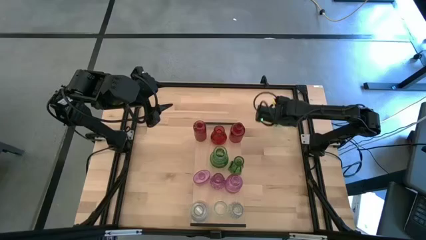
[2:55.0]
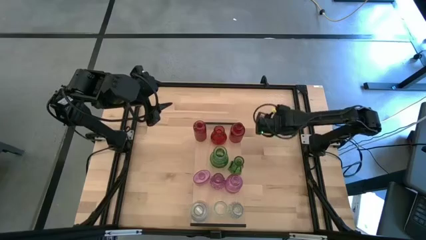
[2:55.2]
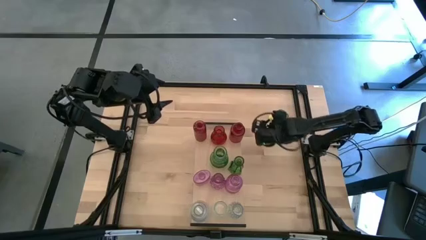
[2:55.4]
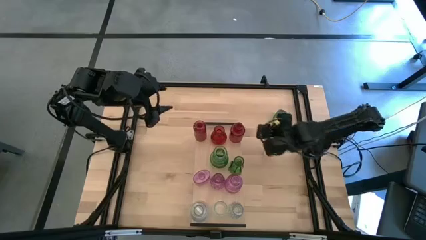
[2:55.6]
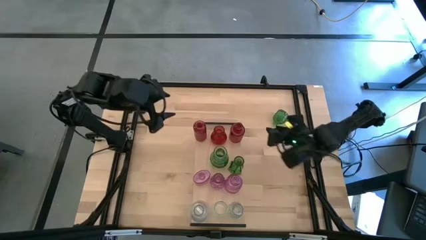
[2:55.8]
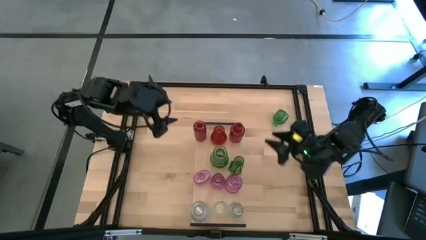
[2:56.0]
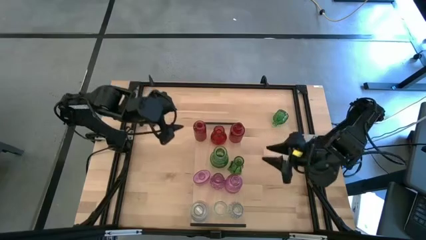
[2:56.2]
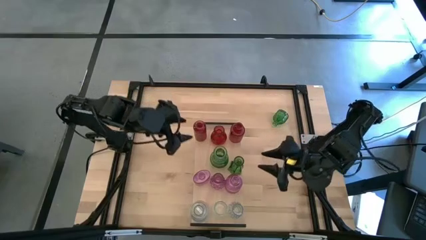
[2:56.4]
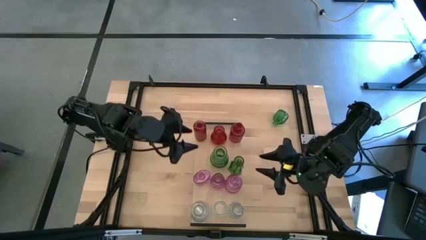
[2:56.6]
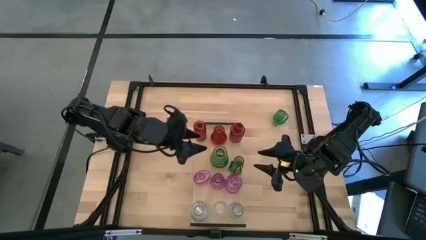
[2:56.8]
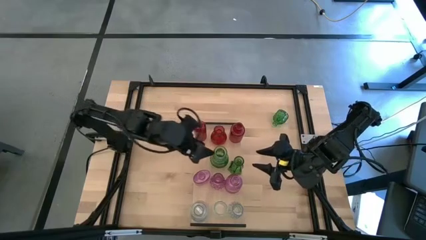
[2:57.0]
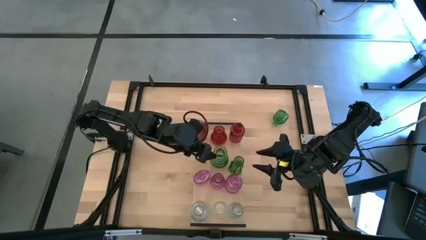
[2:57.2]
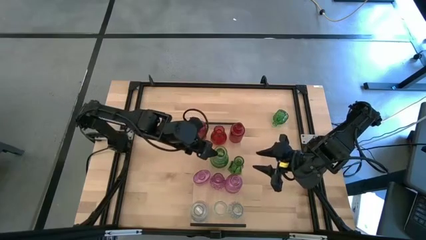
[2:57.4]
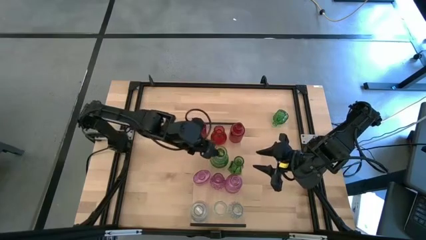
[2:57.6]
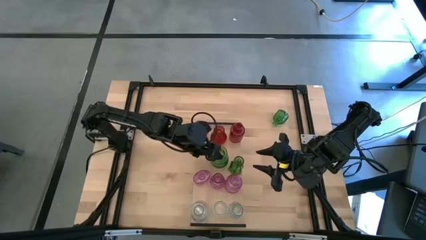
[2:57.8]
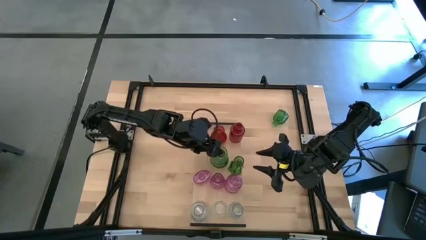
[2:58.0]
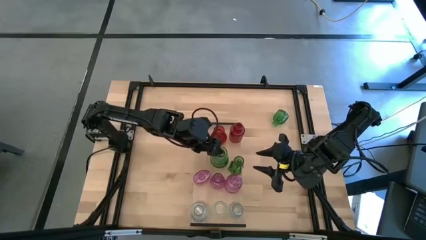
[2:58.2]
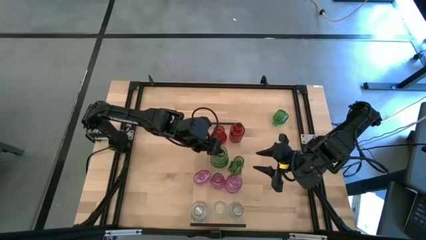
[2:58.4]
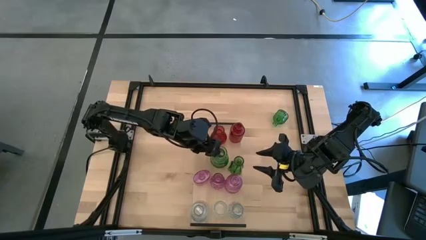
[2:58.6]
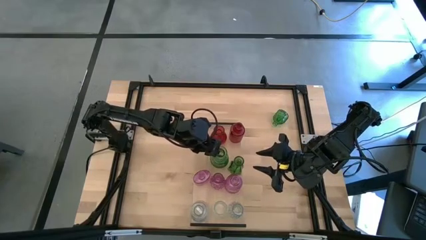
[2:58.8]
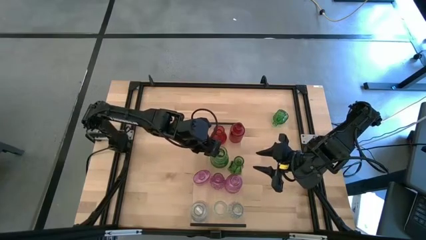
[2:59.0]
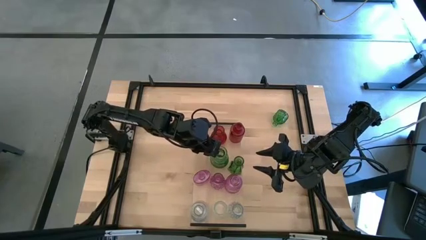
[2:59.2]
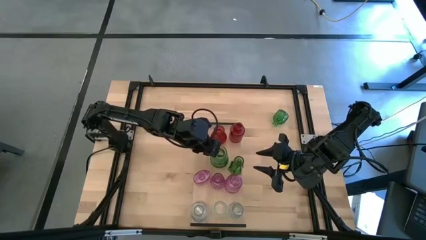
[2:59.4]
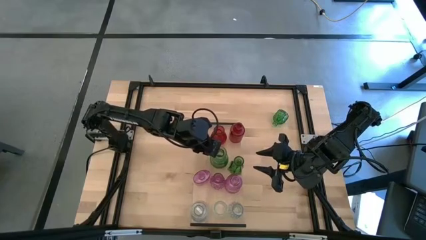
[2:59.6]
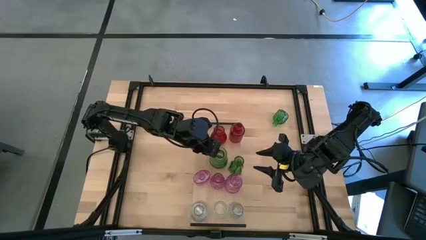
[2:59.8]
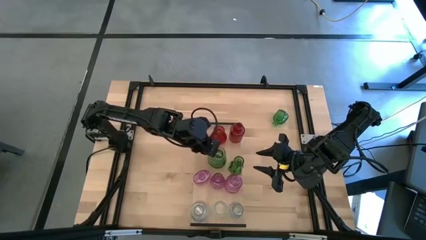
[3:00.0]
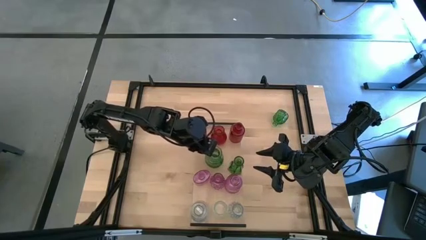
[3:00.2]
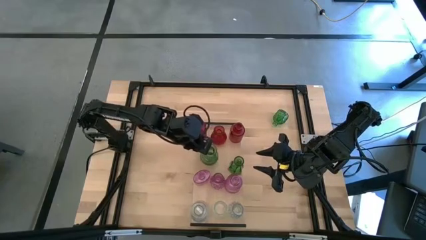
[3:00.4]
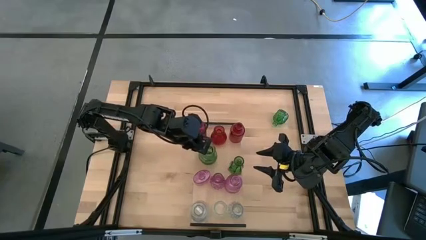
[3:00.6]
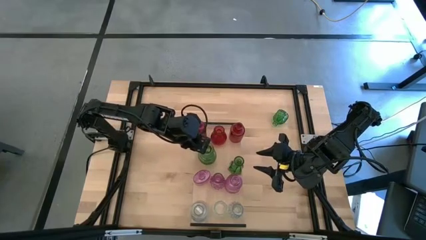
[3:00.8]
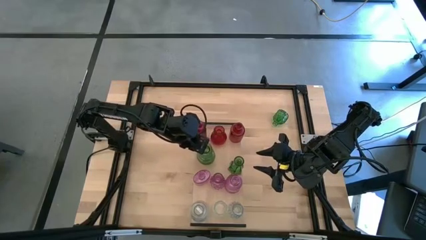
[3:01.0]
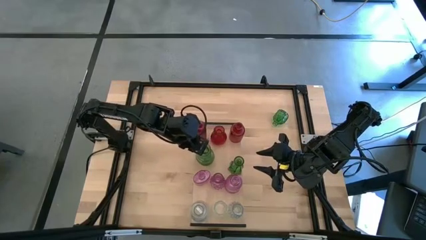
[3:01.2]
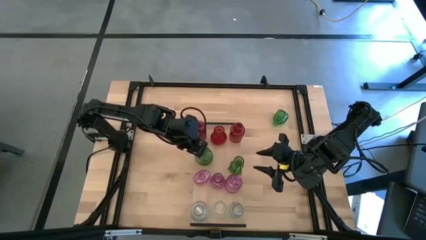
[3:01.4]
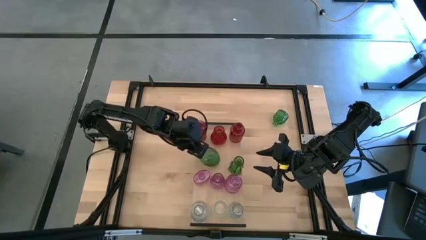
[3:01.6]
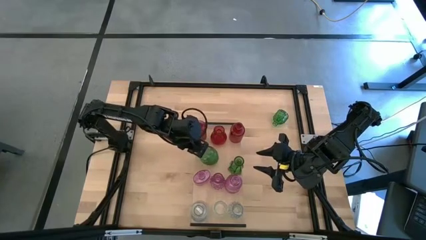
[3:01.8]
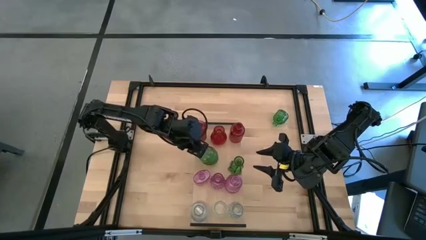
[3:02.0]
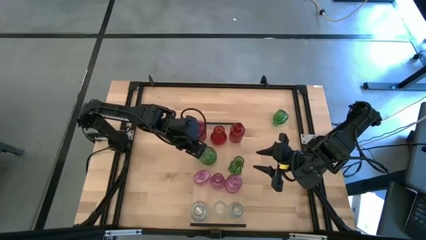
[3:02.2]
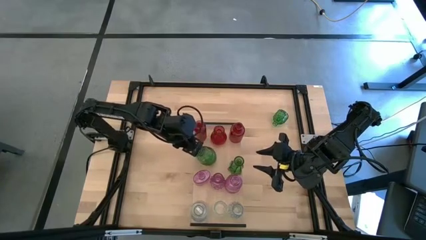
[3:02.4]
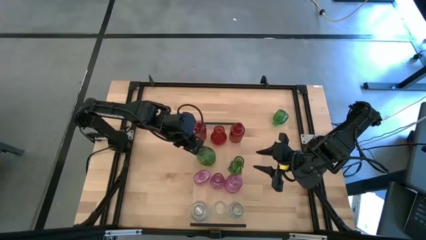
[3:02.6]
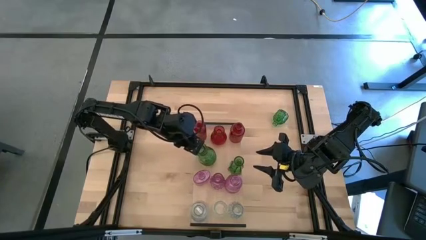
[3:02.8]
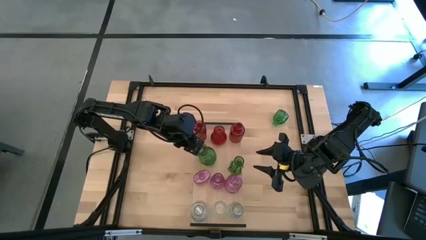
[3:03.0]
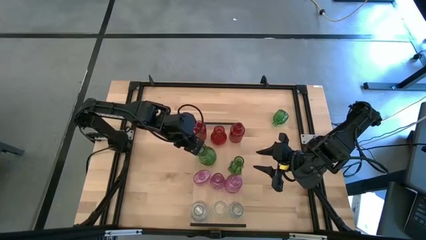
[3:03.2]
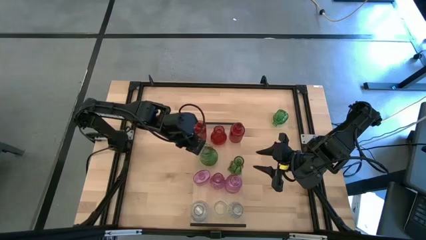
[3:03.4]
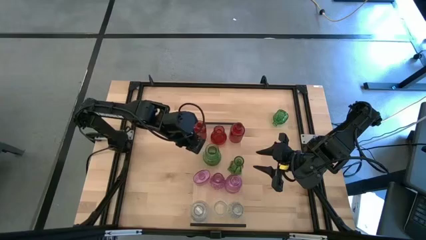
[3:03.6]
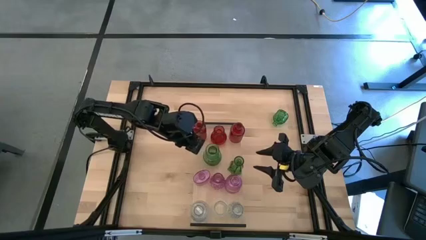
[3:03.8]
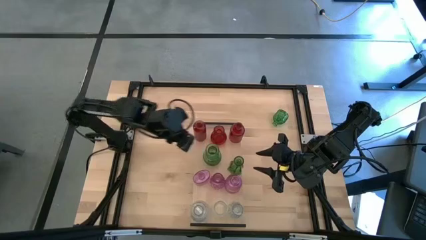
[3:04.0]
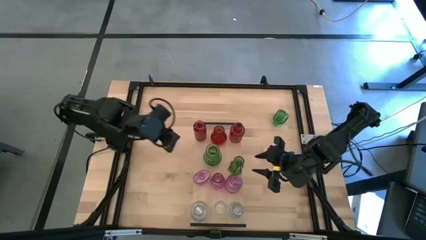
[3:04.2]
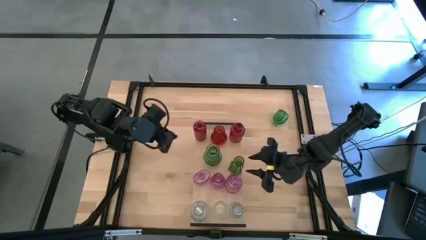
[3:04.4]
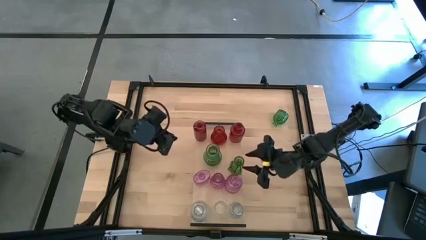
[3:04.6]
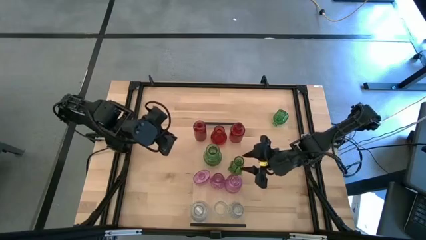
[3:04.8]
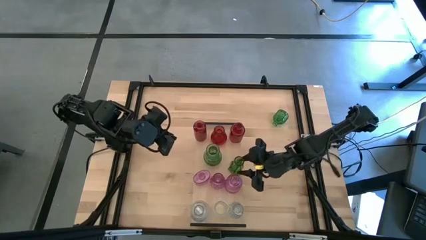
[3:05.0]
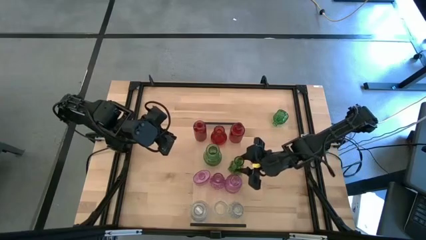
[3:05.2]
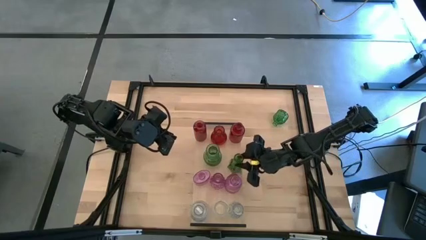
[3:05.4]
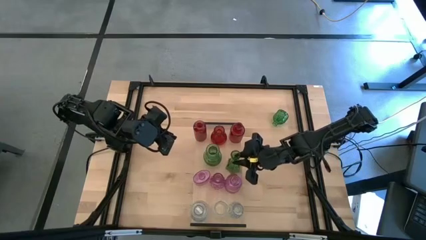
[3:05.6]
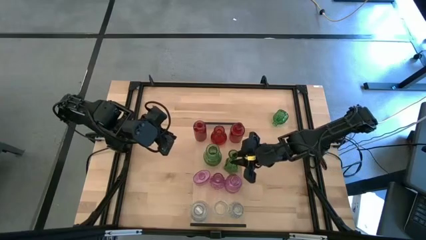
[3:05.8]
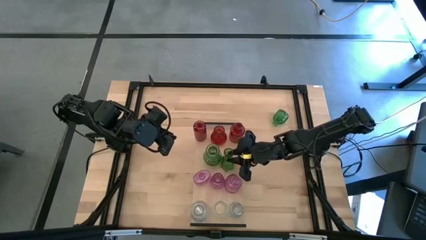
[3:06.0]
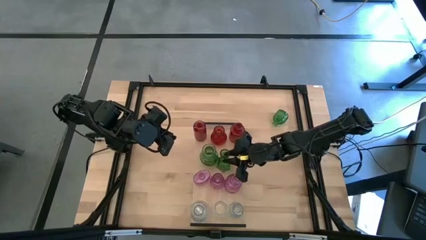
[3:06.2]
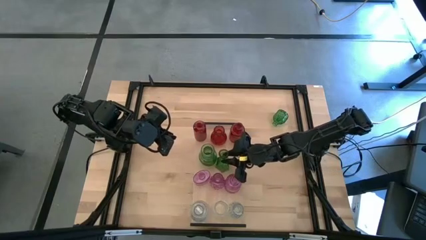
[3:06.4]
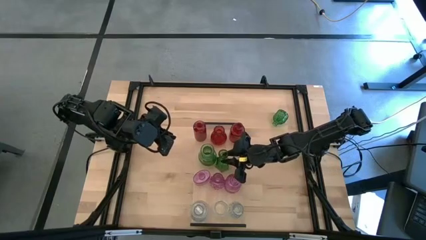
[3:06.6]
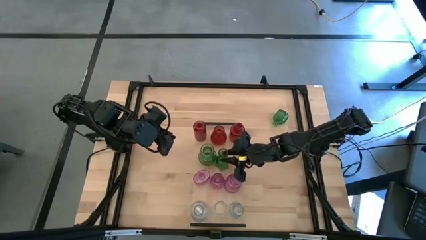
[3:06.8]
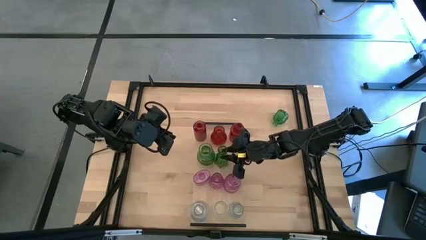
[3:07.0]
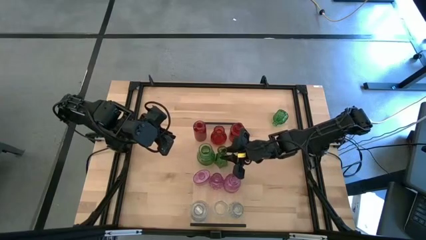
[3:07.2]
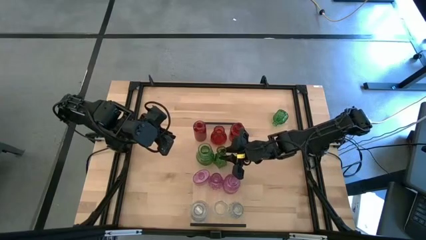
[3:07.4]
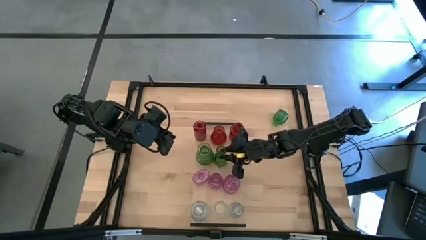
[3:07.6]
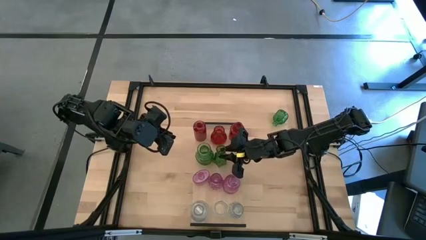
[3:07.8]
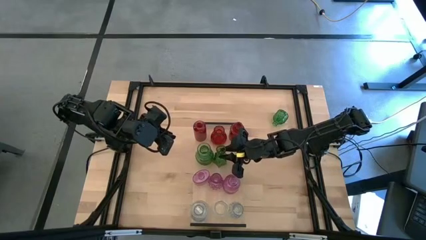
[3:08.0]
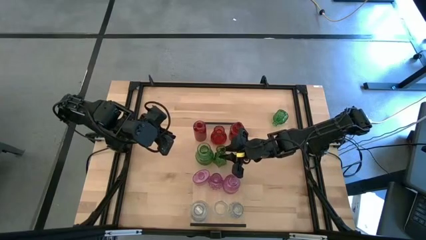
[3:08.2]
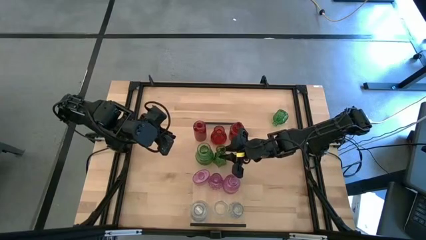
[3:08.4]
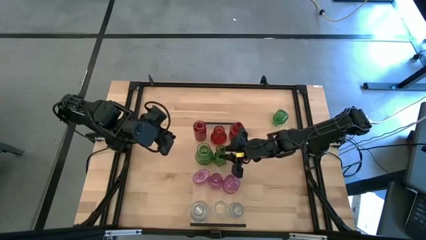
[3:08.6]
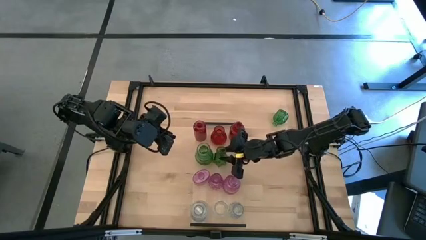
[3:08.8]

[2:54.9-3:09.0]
Task: sort vases onto shelf
Adjust the green flower vases on the shelf

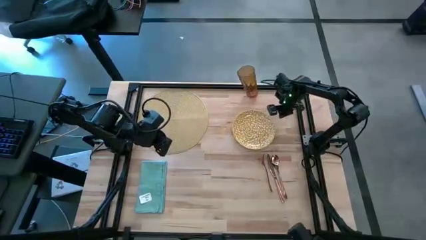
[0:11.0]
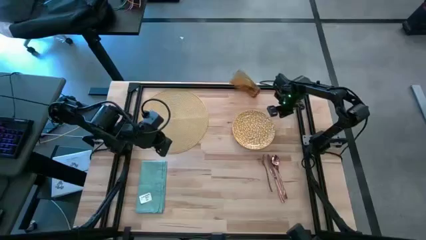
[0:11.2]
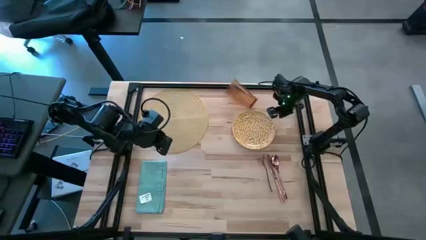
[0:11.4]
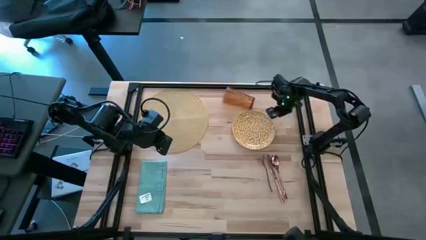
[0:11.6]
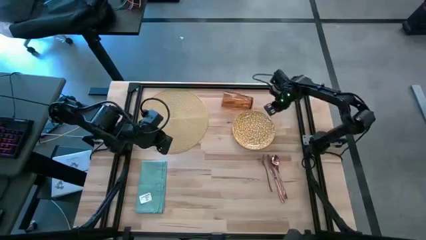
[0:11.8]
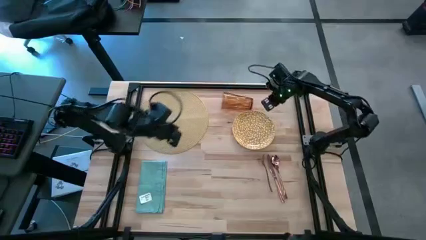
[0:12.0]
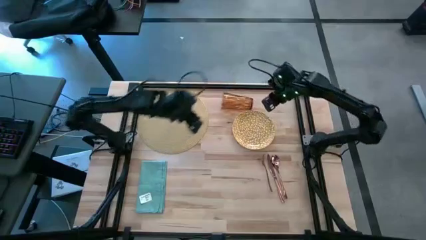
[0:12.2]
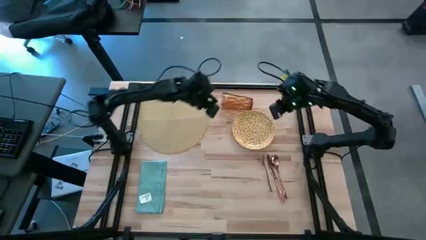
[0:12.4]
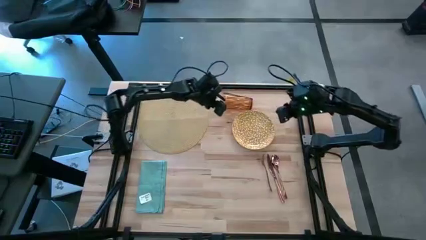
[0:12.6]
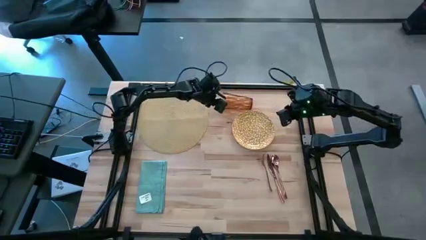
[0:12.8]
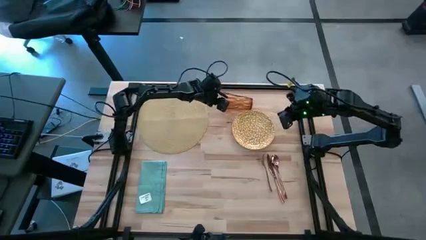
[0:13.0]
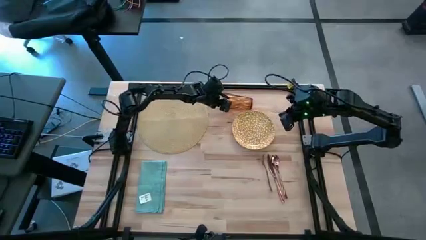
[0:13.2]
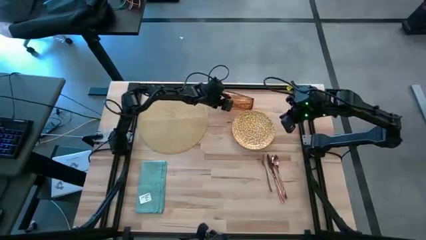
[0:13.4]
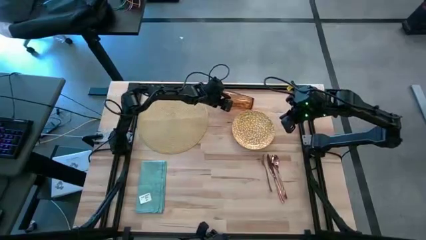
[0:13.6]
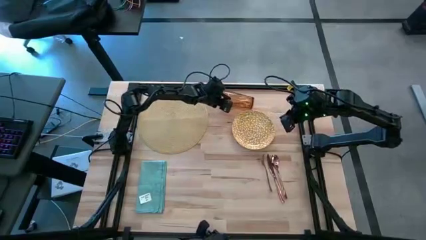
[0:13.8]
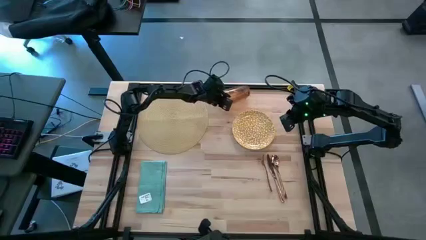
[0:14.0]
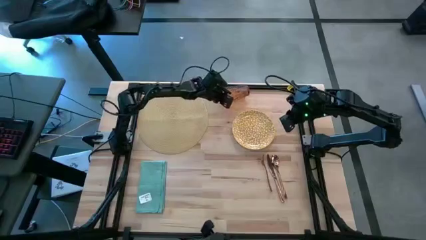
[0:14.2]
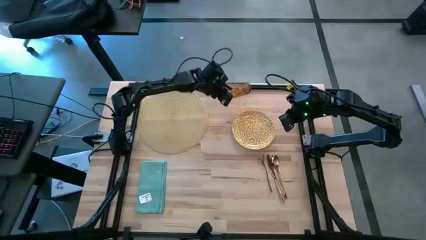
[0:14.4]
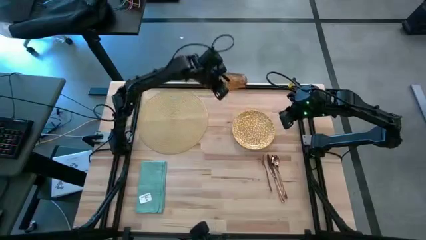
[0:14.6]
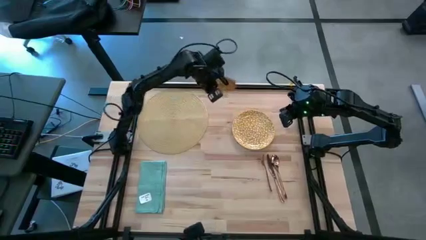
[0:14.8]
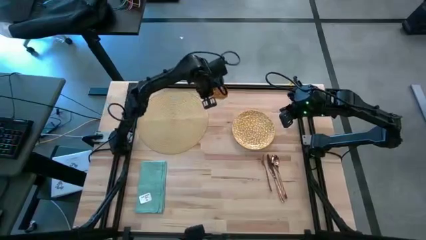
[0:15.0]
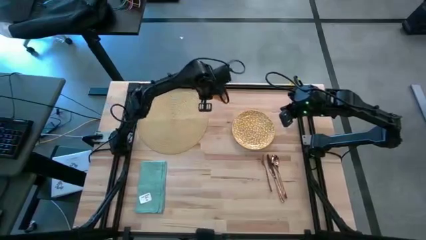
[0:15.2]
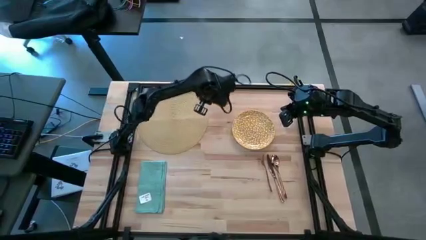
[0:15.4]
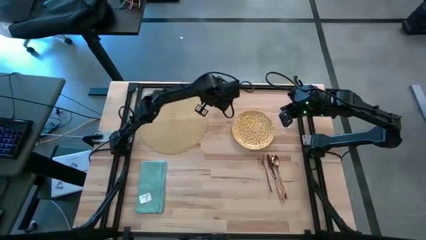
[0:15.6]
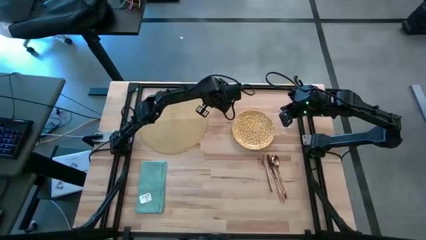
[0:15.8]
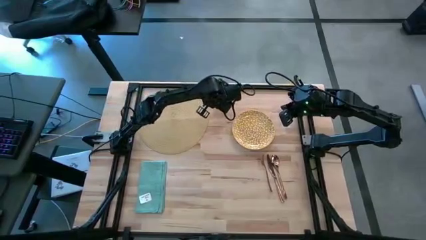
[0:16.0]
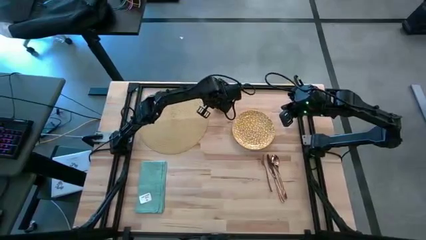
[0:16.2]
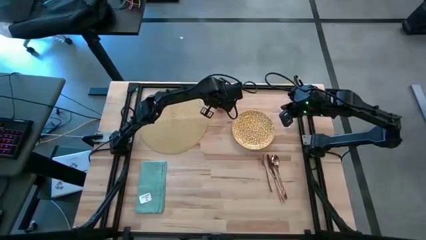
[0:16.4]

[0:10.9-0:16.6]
Task: Set table place
Adjust the brown glass on the table
